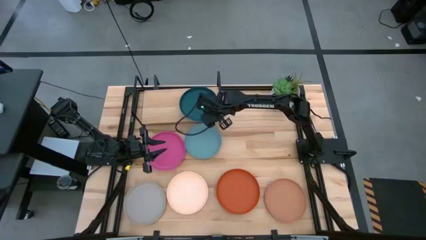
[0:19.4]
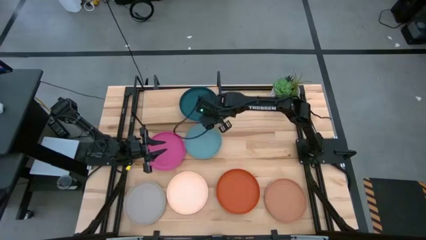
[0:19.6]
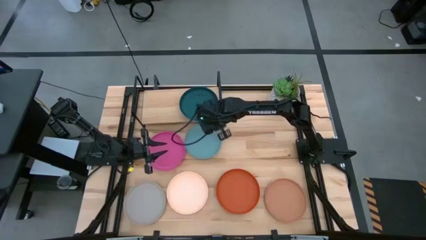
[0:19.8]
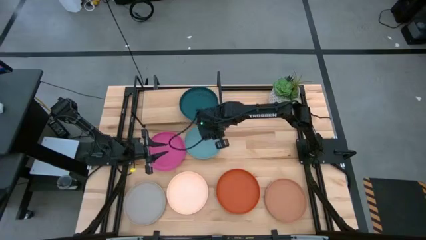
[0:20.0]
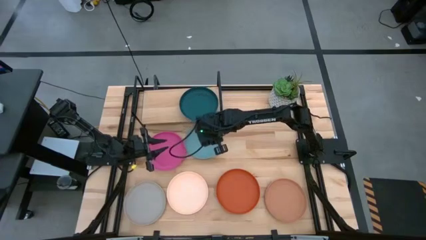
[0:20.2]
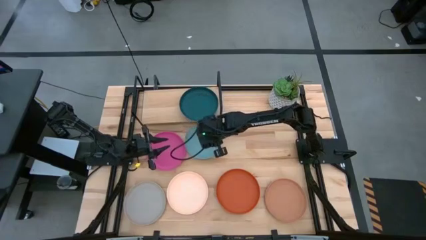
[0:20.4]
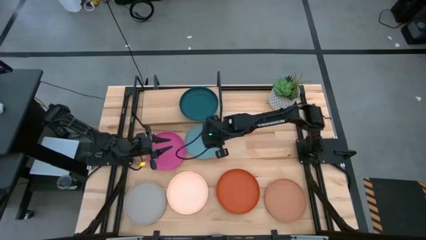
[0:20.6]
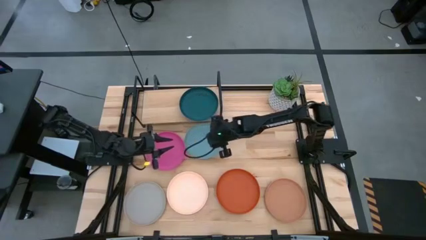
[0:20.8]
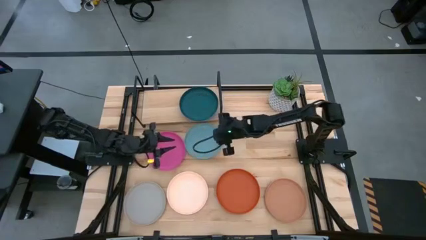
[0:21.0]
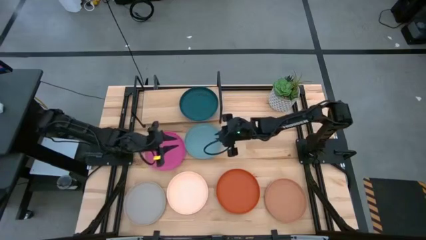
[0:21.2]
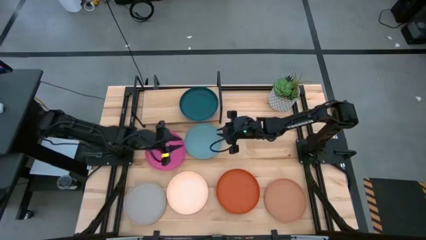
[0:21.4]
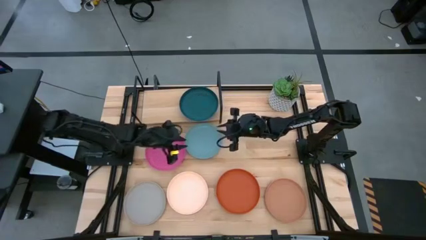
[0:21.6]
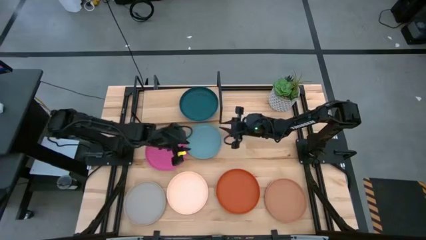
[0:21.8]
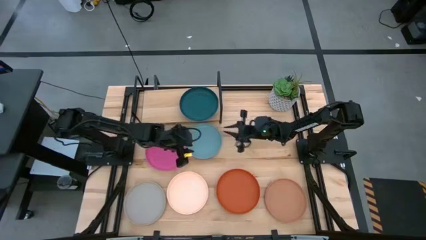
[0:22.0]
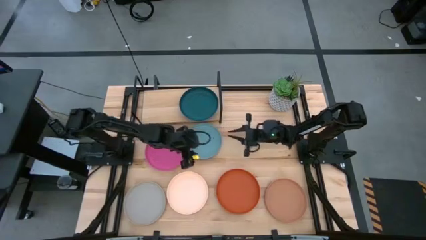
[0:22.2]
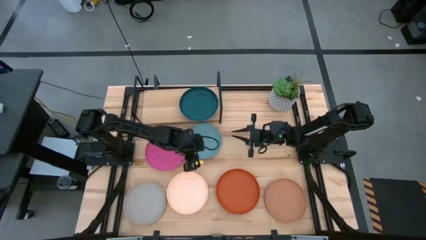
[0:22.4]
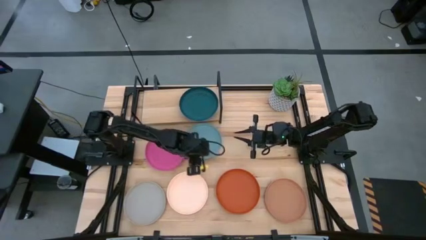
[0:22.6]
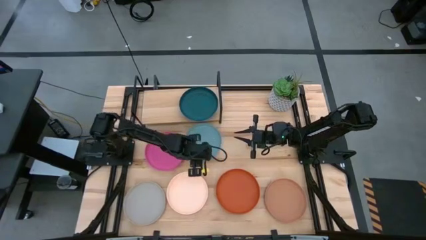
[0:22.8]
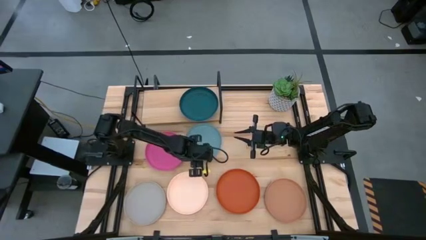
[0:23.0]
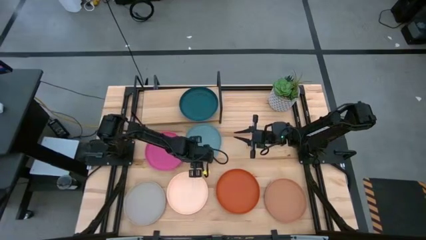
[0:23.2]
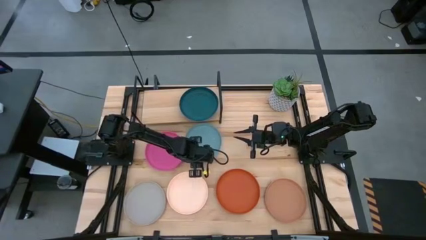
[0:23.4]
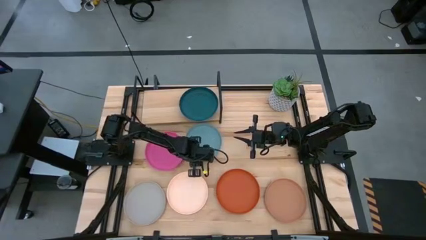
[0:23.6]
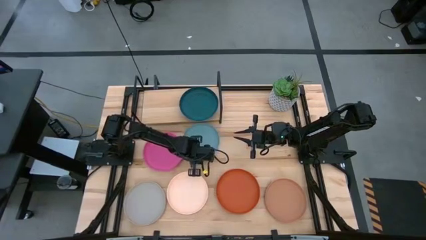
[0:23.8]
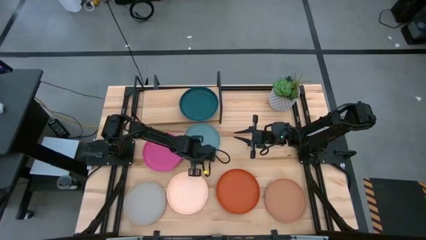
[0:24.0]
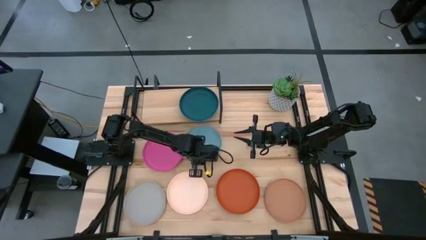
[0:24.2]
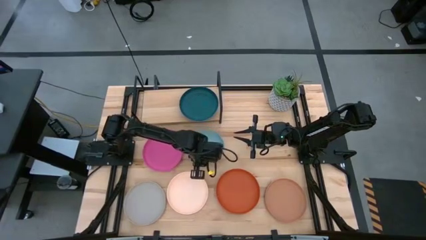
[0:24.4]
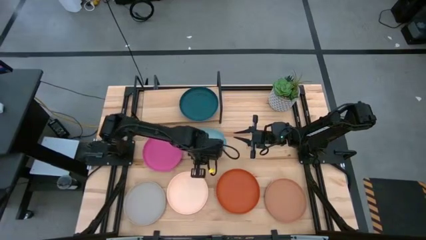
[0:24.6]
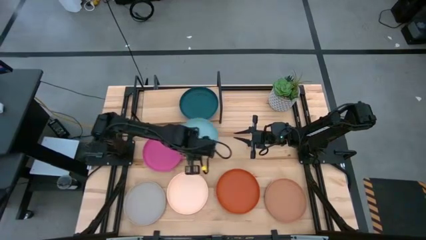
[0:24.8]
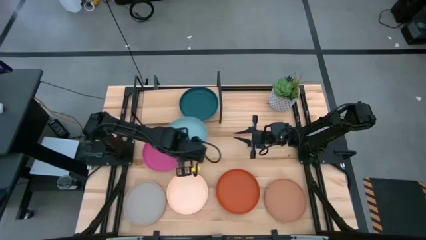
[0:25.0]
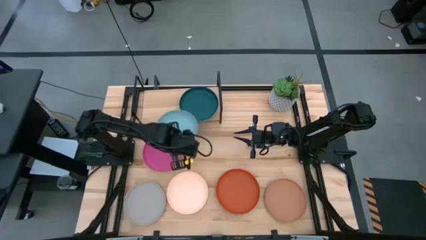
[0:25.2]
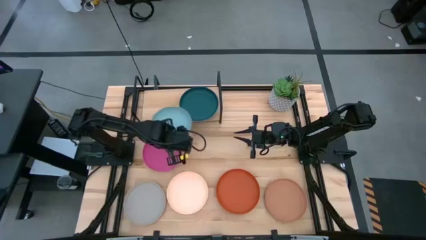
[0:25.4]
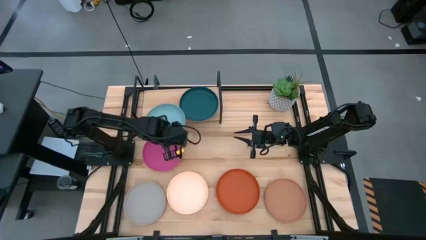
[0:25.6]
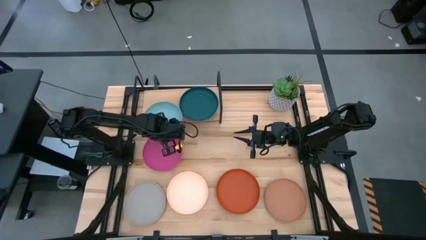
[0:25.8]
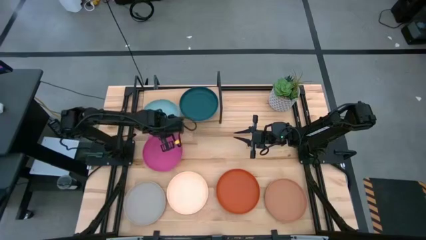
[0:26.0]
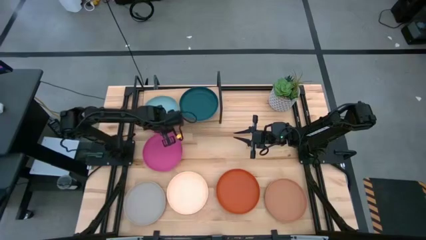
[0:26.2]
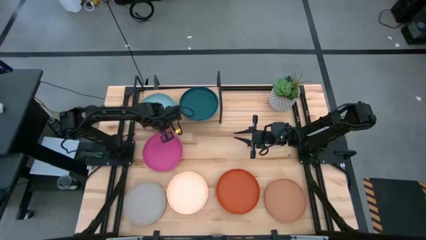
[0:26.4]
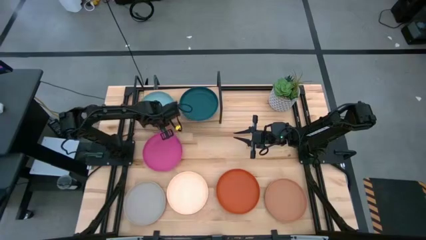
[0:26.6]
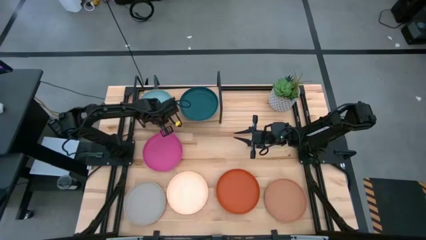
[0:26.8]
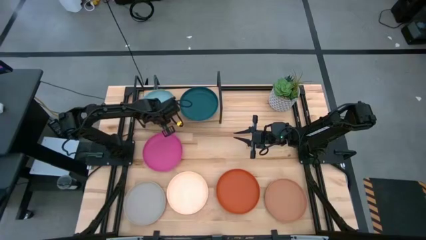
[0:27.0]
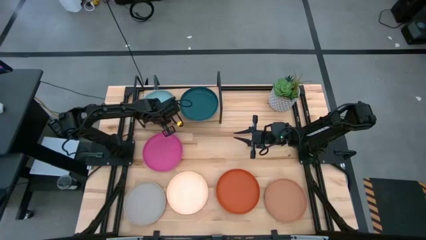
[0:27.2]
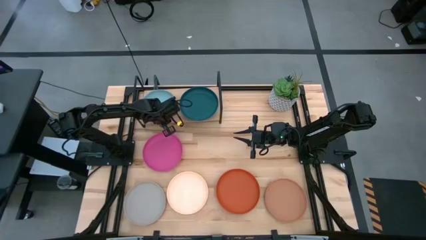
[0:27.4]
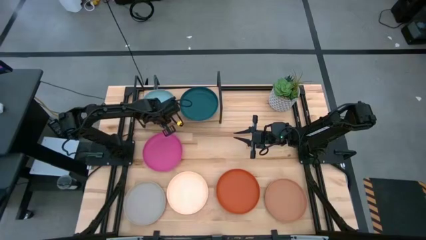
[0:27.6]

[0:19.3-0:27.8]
Task: Place and stack plates onto a shelf
Put the light blue plate on the shelf

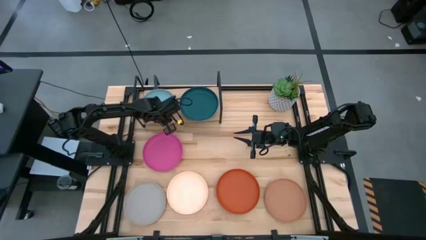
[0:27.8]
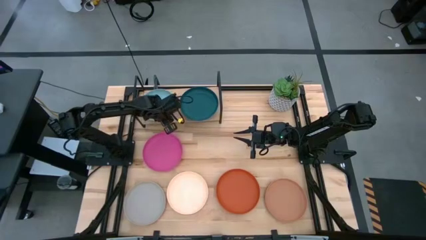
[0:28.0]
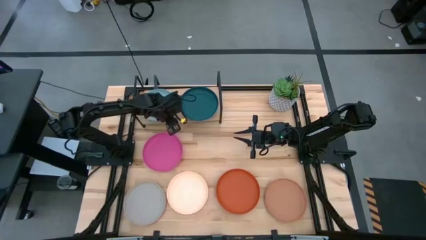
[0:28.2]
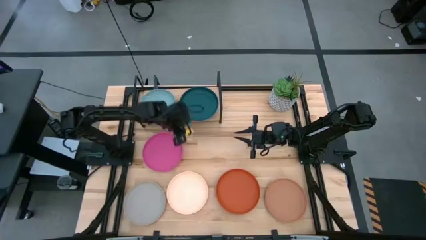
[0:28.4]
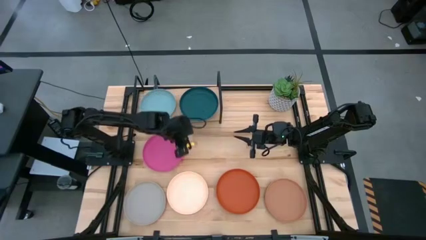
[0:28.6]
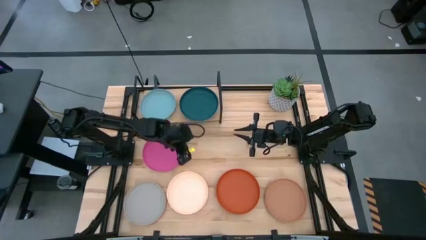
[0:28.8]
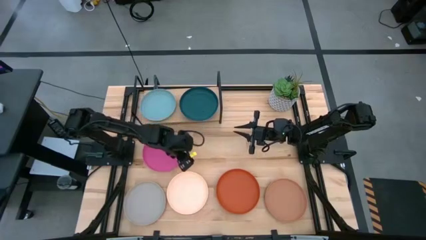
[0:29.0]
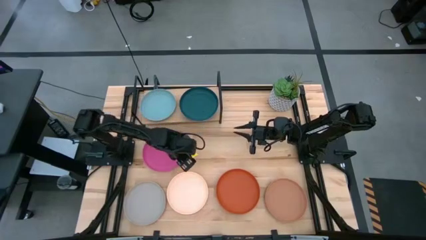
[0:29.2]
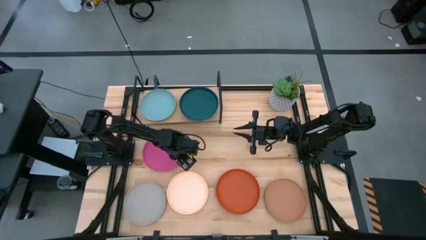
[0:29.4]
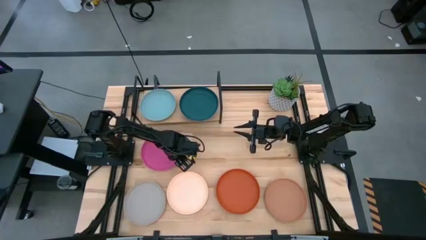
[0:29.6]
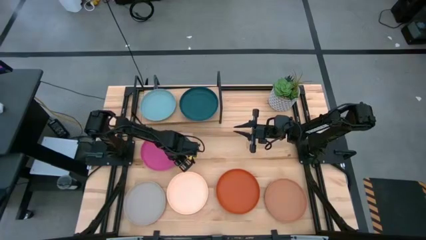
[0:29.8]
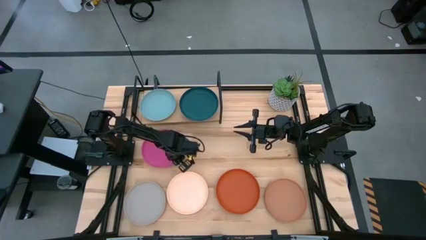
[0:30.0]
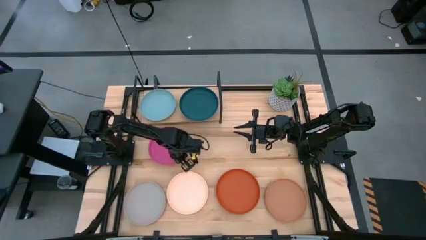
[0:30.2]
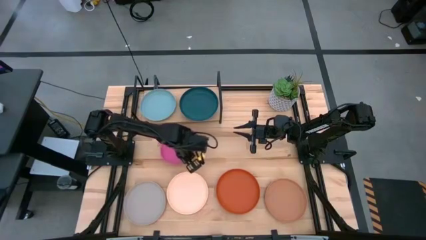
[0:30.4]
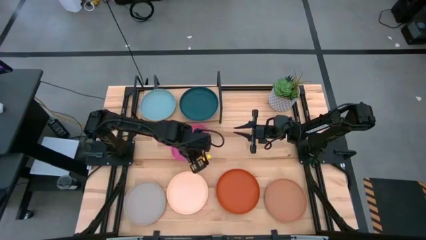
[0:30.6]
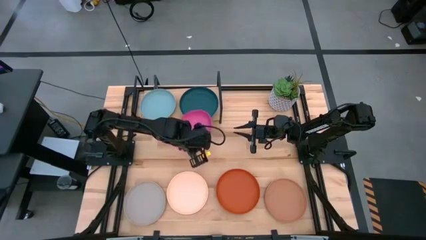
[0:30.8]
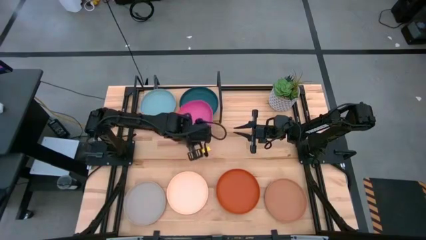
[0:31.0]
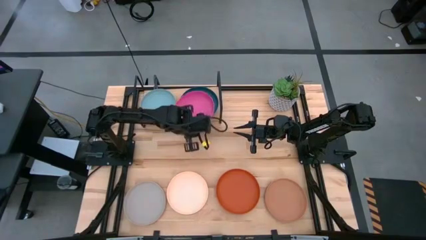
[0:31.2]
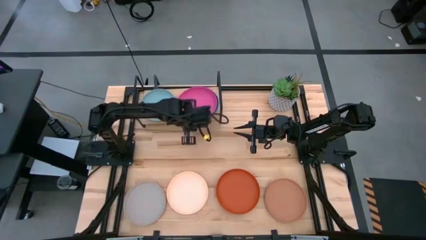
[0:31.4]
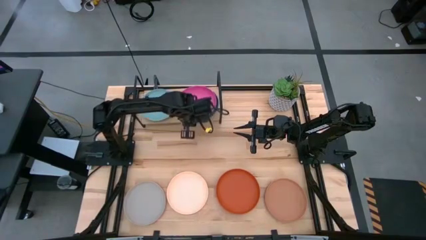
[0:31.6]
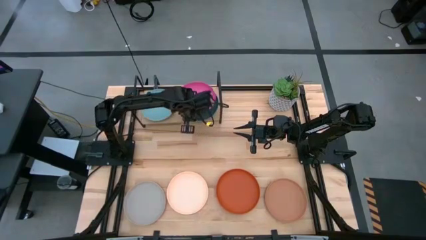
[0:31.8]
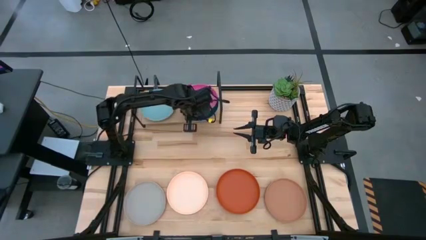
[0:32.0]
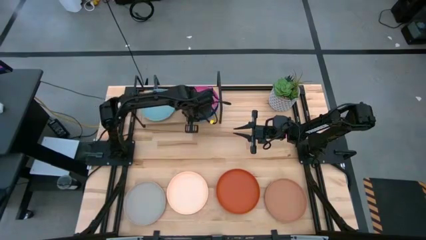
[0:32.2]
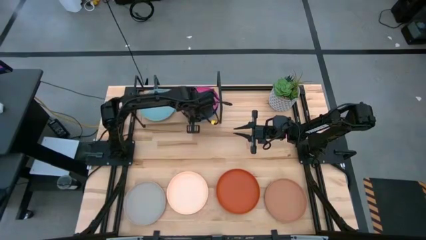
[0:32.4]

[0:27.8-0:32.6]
Stack the pink plate on top of the dark green plate on the shelf

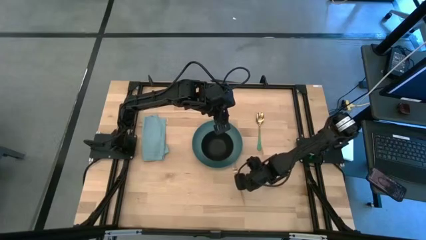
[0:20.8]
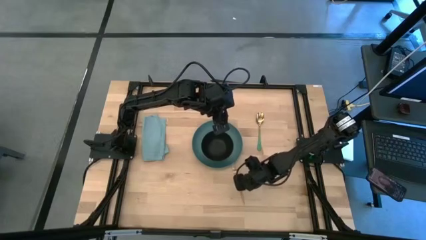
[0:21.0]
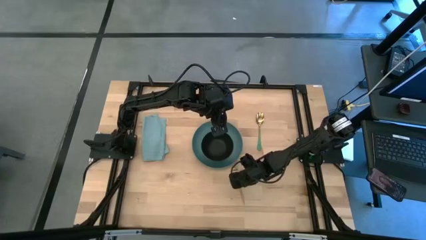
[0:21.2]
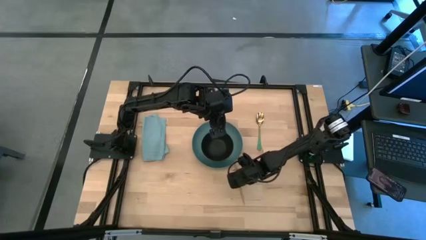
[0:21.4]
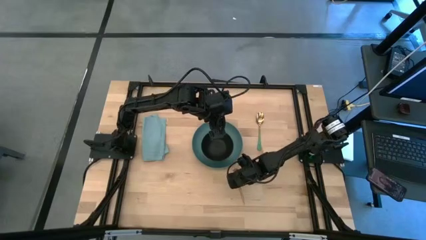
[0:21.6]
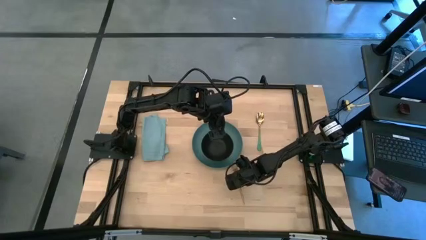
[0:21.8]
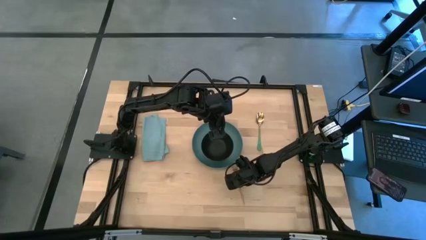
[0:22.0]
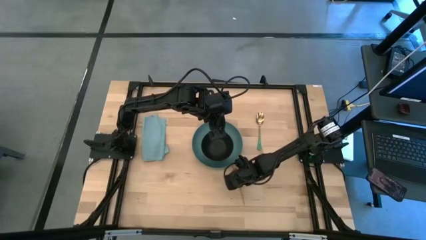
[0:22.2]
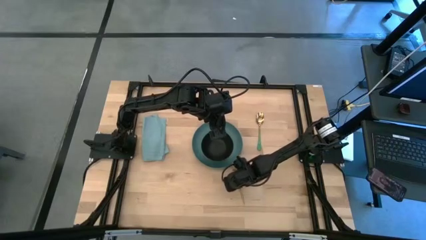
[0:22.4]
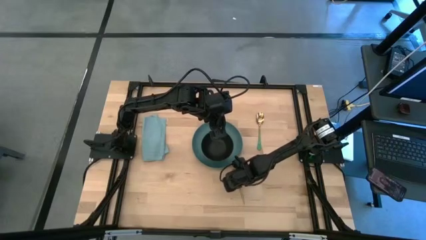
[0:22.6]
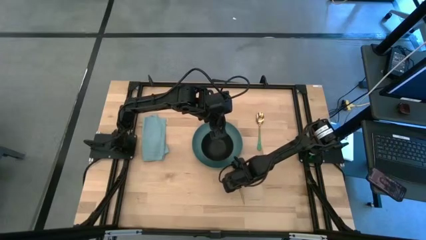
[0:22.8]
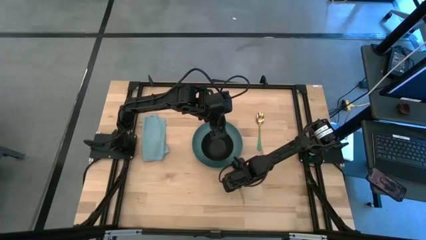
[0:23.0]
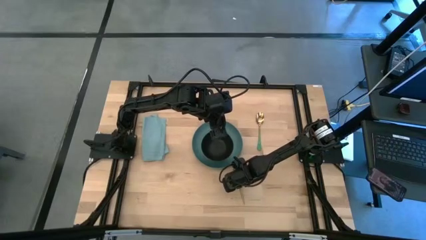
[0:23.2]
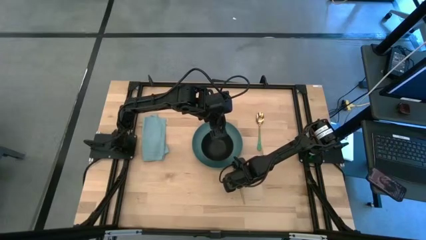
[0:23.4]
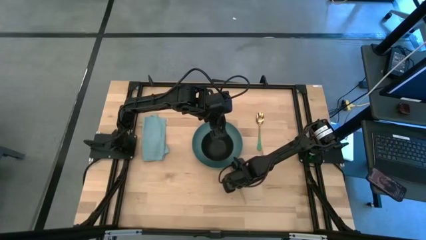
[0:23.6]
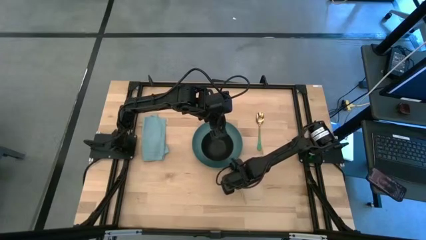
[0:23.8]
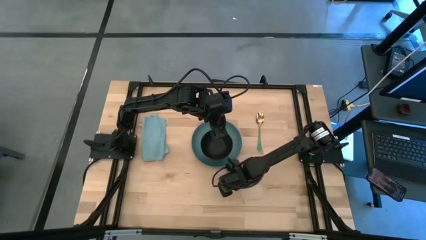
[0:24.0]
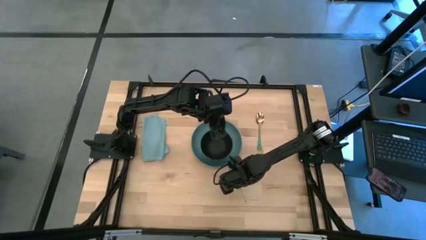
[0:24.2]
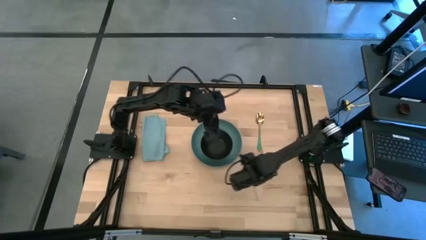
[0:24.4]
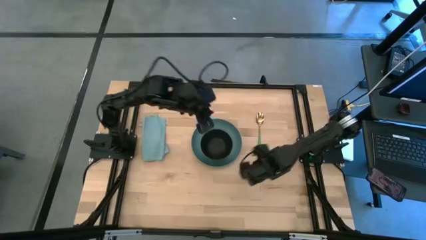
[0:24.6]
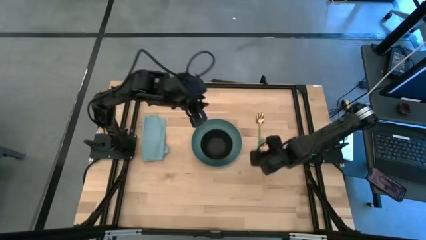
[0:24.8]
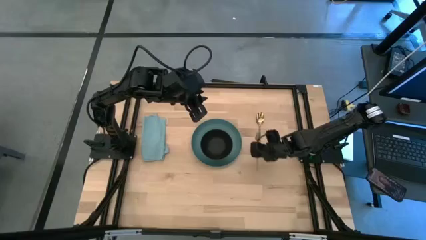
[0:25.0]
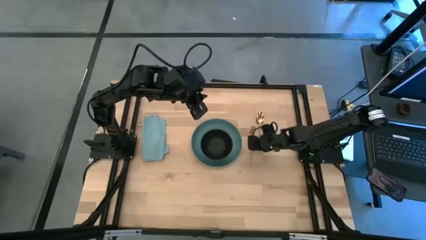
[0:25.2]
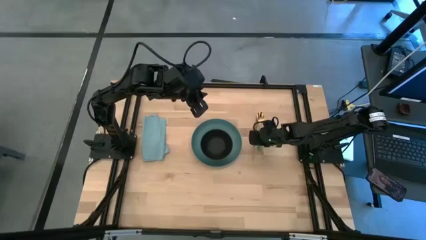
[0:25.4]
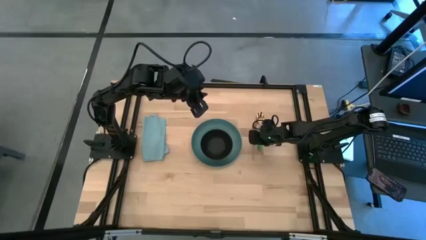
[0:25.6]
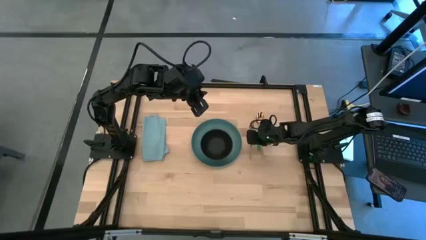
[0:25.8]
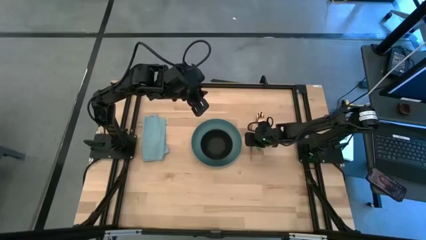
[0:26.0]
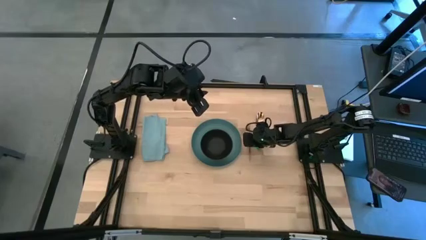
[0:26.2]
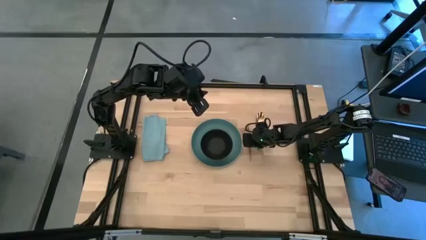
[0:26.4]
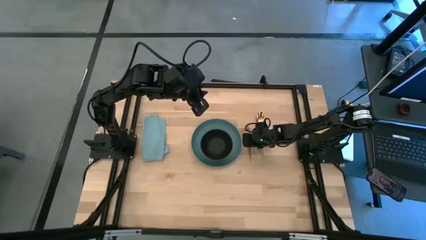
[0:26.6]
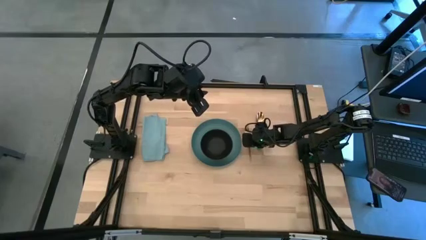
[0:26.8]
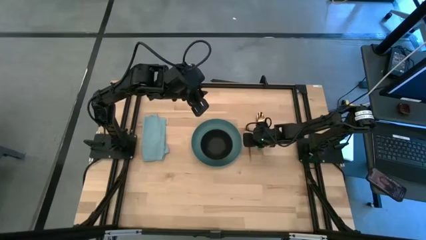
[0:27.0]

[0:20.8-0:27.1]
Task: Set table place
Put the gold fork on the right side of the green plate
